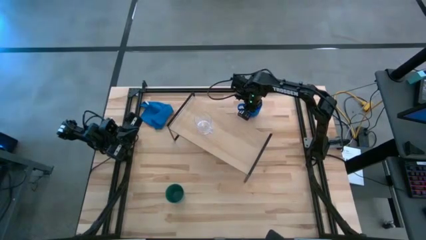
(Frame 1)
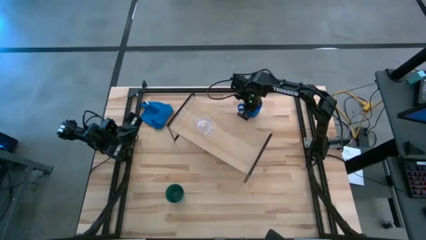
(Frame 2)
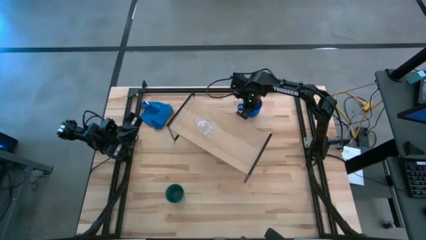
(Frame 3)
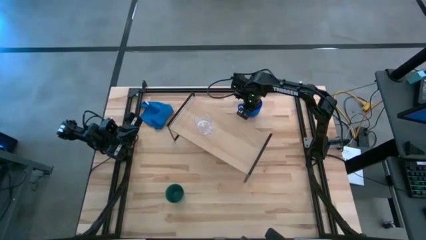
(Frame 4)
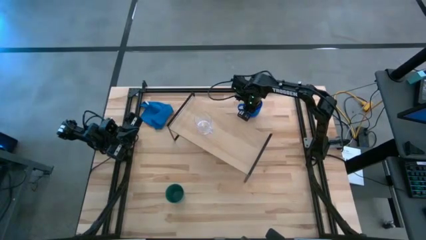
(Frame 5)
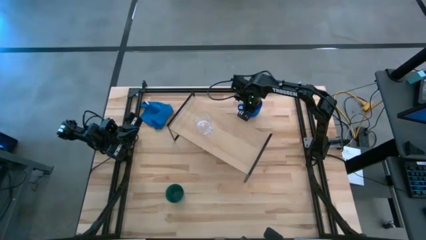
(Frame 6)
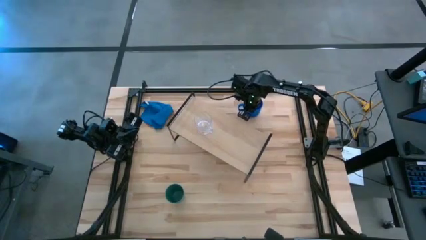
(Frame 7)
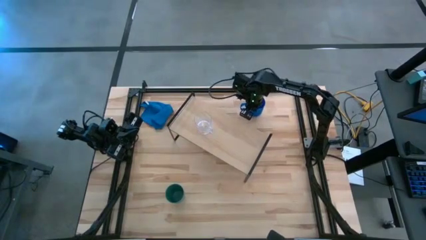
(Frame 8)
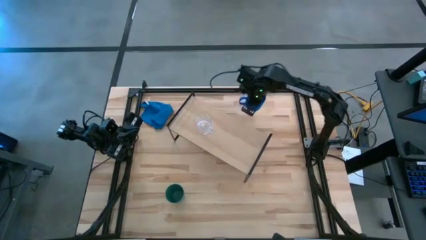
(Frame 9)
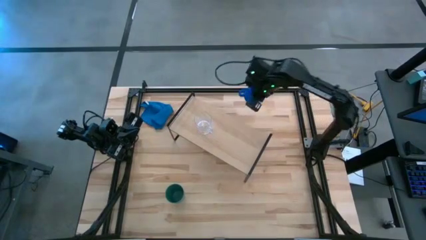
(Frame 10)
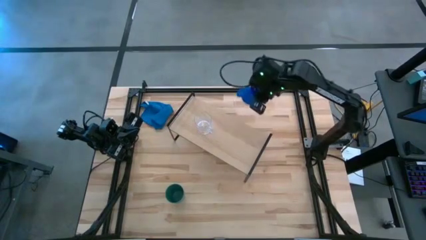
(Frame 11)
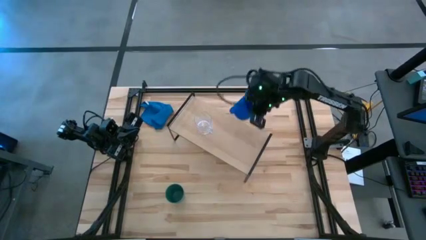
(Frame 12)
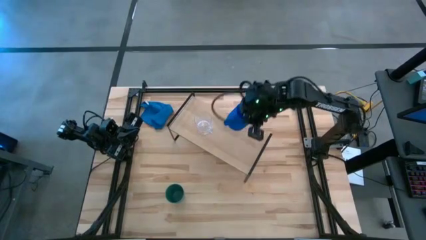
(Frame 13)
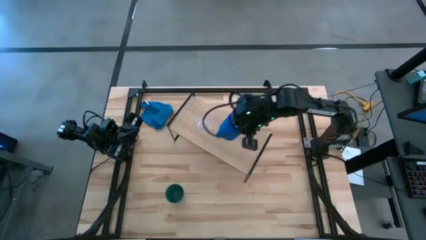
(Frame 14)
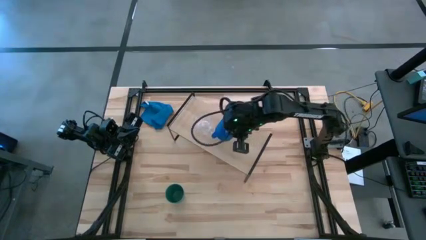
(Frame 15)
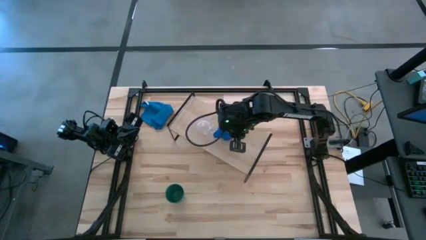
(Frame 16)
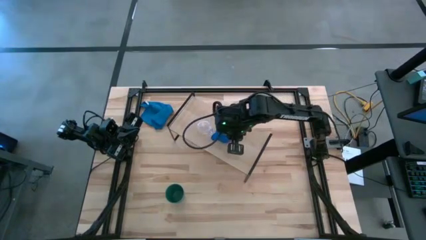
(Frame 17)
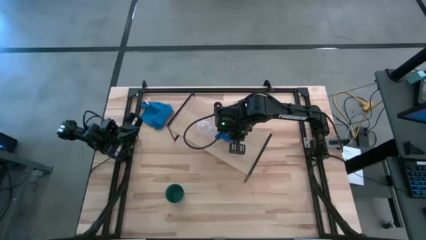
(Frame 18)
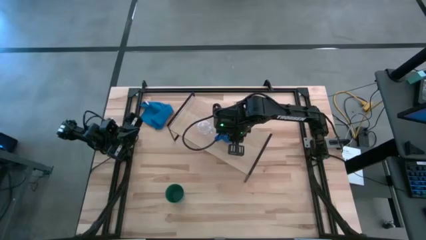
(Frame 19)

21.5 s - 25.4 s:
Task: Stack small to large cups/mugs on shelf
Put the blue mug on the shelf

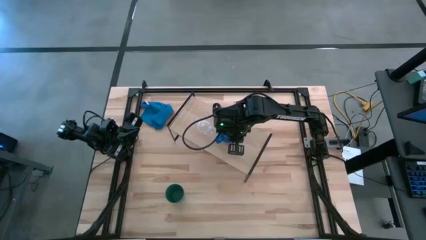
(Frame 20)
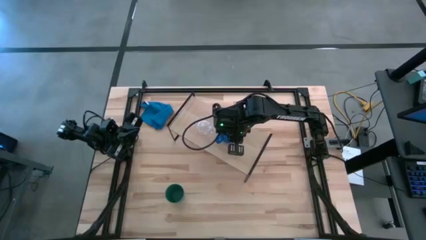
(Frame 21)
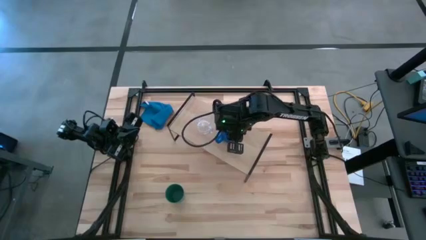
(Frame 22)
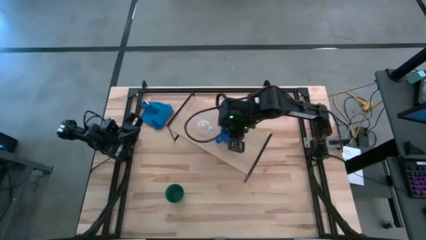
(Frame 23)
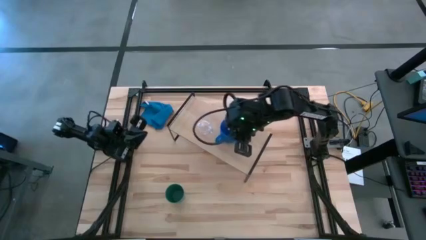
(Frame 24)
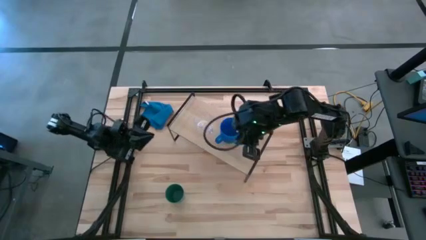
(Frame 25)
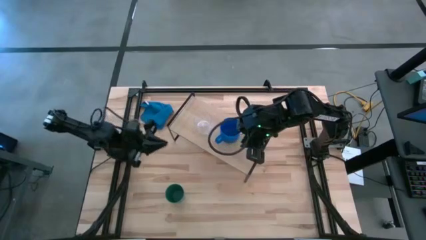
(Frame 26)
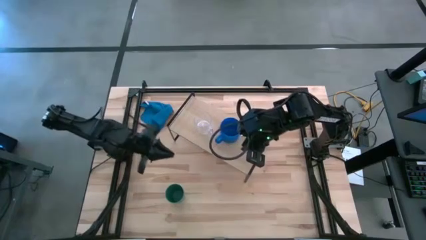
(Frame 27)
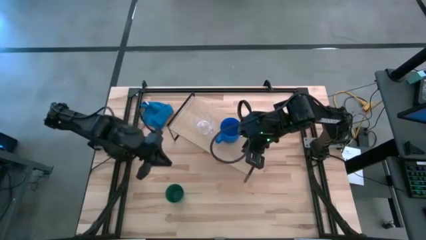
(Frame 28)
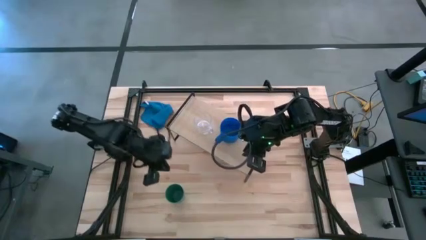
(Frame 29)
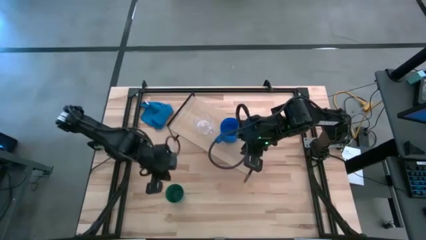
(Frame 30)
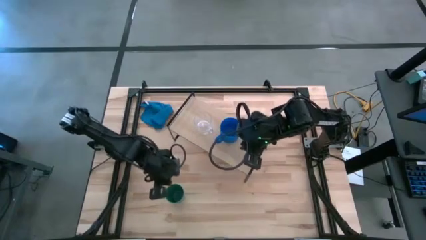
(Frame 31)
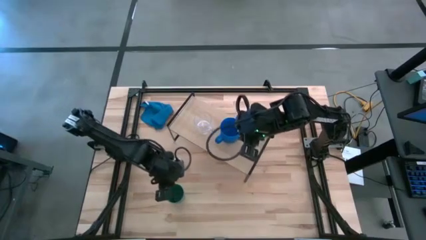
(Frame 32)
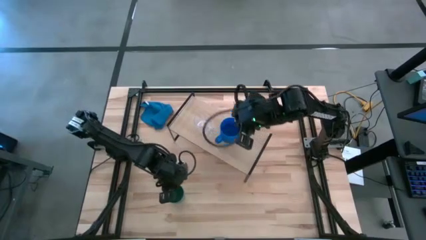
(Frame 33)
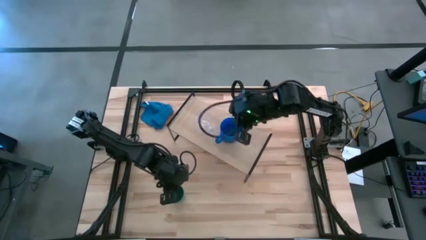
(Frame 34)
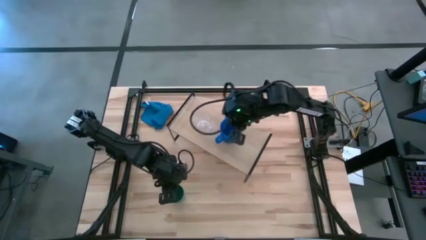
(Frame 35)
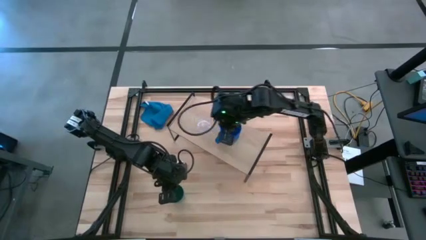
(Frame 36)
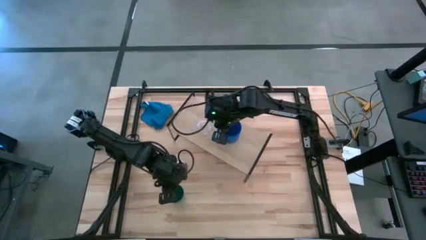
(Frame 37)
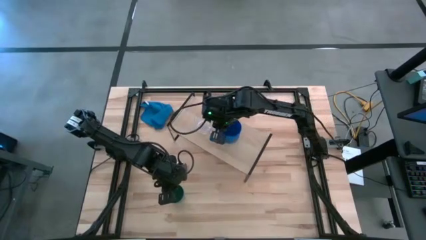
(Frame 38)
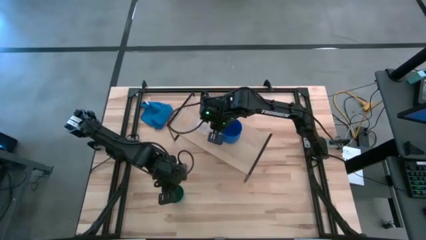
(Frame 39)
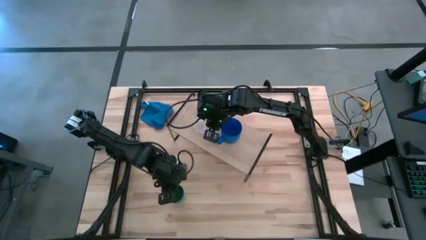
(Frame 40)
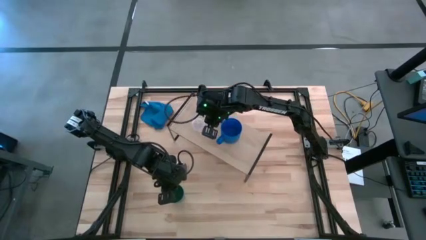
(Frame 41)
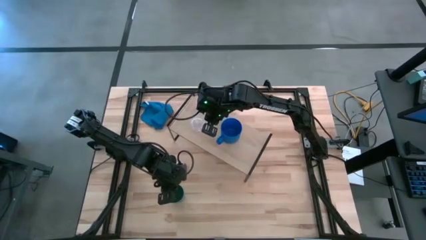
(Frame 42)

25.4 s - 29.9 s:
Adjust the transparent mug on the shelf

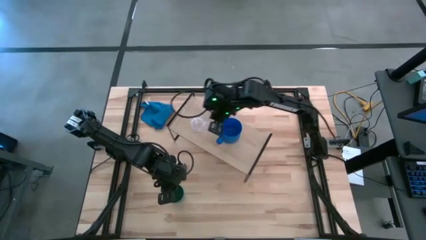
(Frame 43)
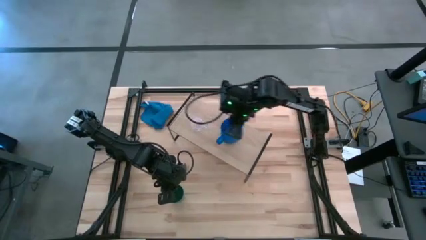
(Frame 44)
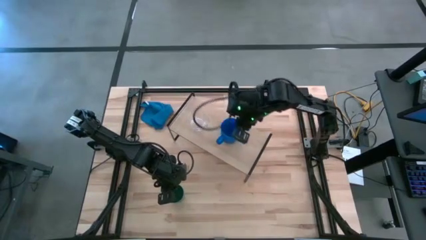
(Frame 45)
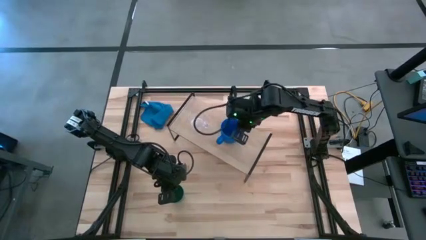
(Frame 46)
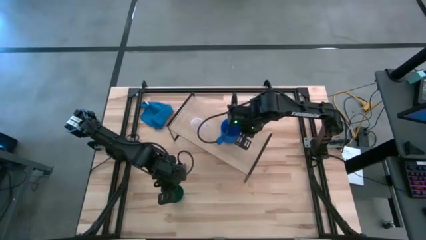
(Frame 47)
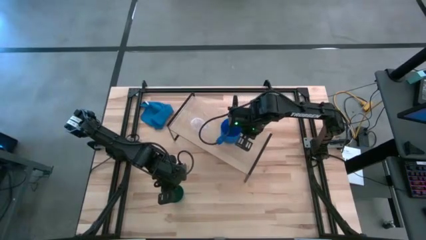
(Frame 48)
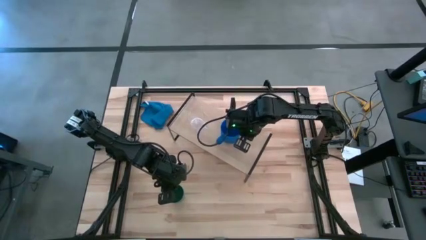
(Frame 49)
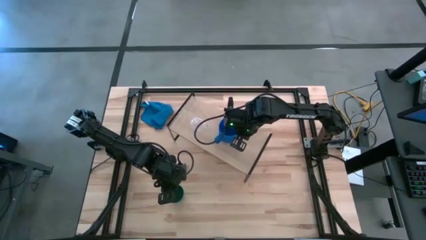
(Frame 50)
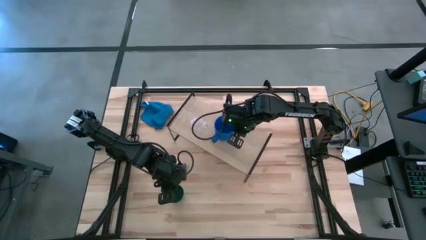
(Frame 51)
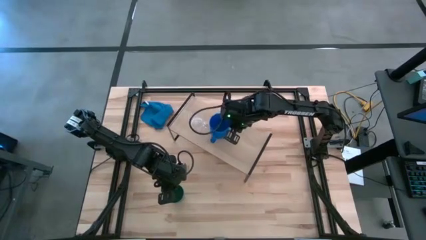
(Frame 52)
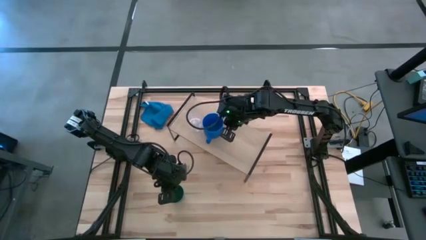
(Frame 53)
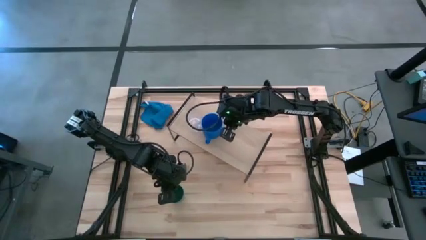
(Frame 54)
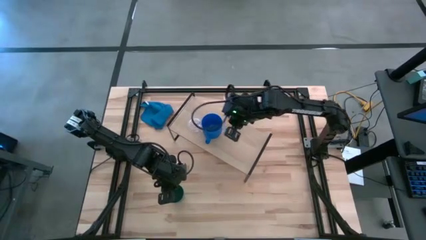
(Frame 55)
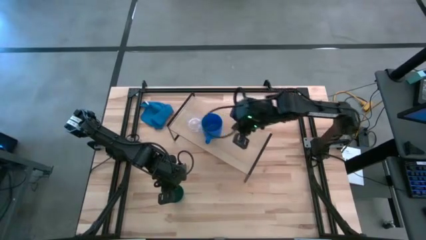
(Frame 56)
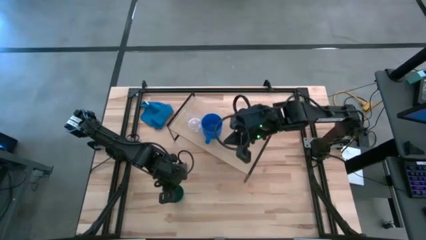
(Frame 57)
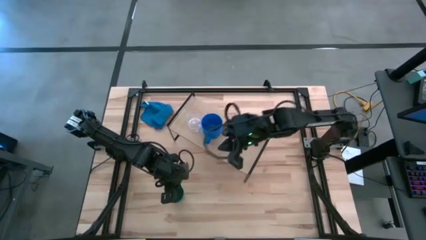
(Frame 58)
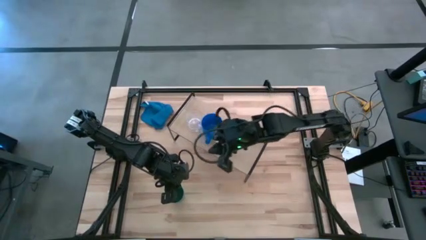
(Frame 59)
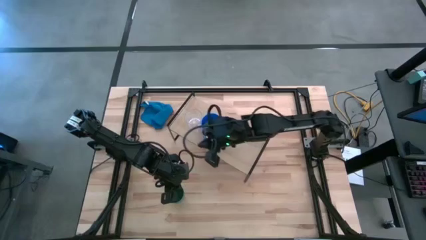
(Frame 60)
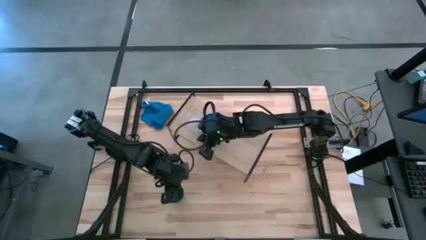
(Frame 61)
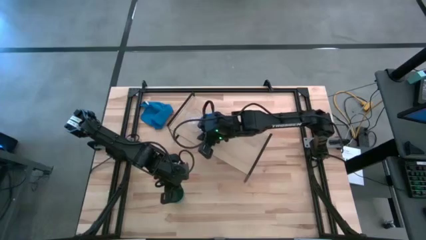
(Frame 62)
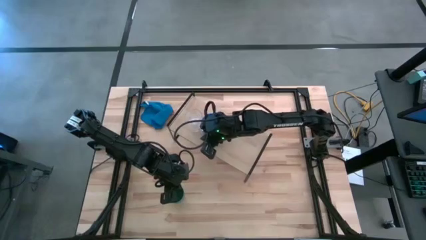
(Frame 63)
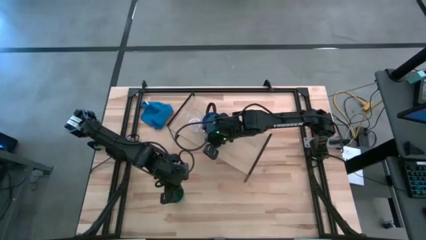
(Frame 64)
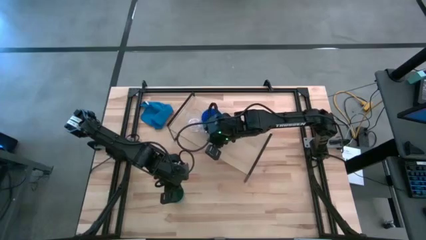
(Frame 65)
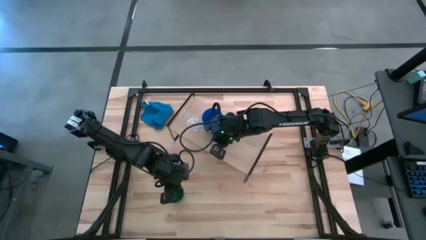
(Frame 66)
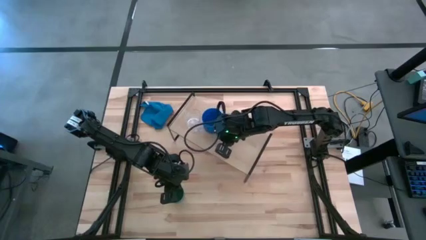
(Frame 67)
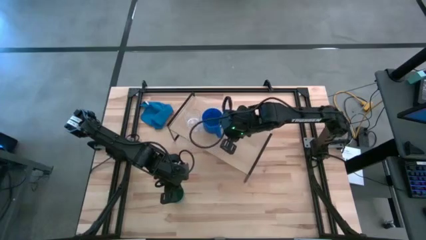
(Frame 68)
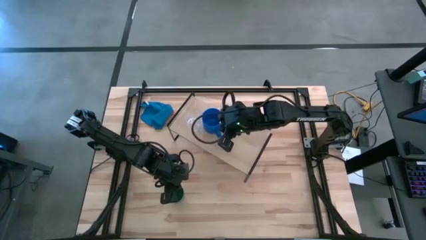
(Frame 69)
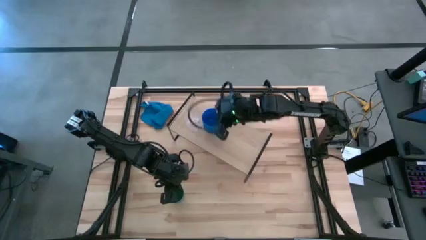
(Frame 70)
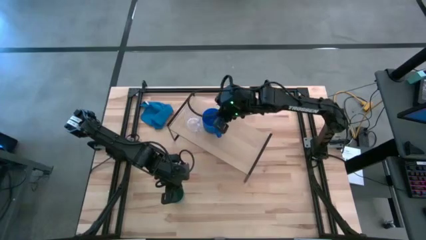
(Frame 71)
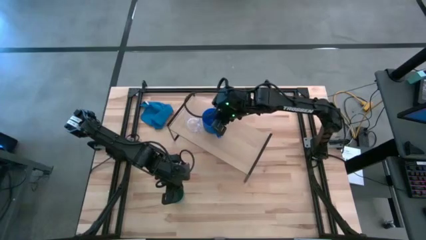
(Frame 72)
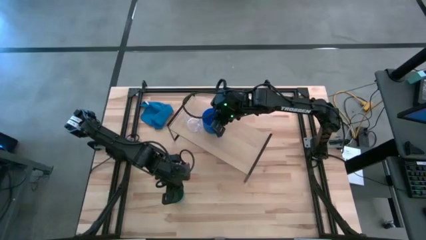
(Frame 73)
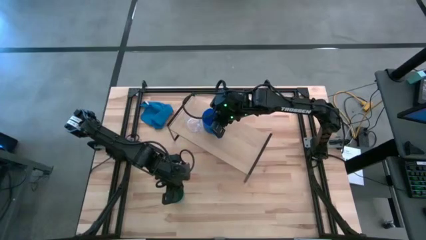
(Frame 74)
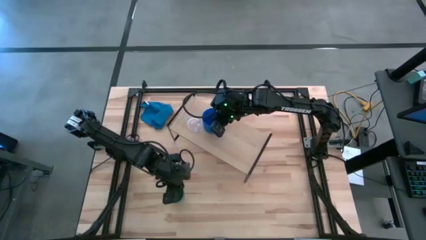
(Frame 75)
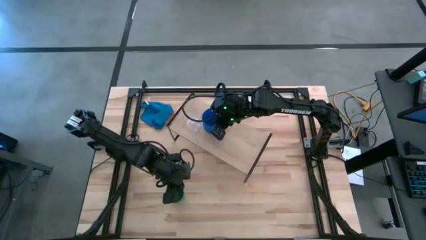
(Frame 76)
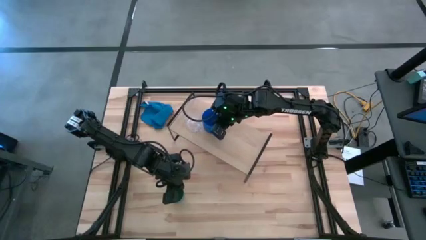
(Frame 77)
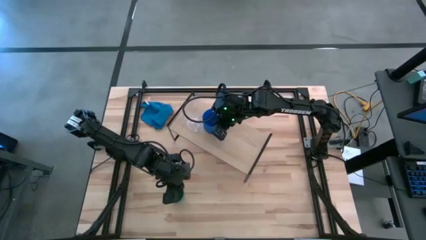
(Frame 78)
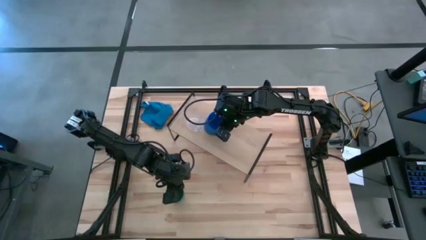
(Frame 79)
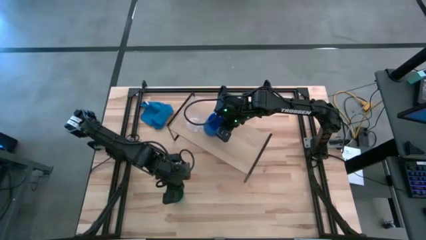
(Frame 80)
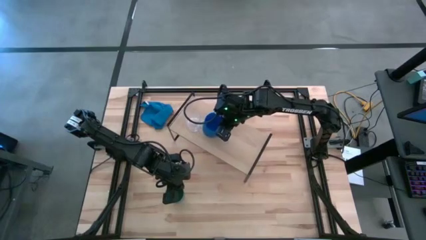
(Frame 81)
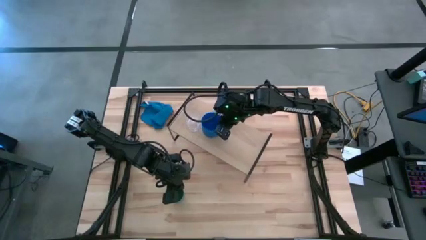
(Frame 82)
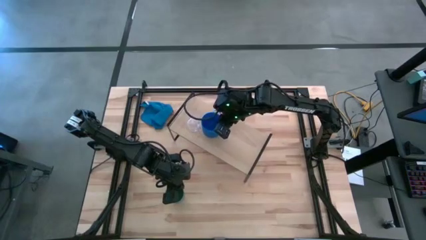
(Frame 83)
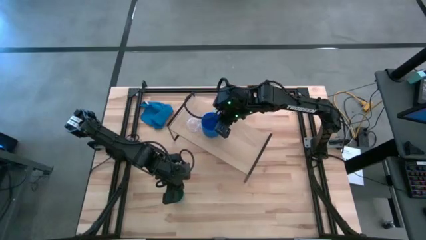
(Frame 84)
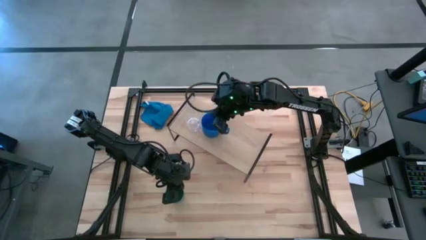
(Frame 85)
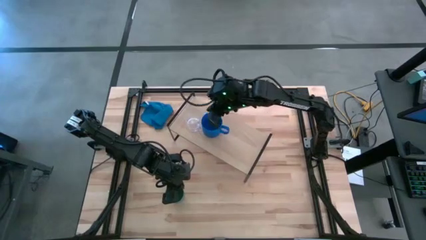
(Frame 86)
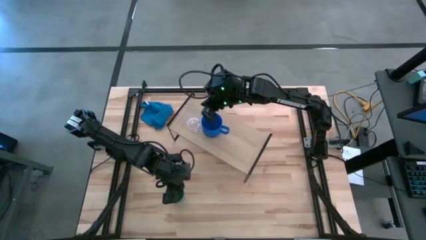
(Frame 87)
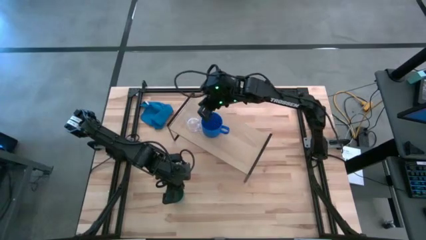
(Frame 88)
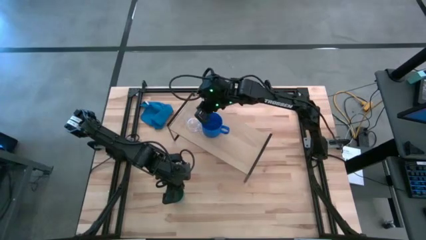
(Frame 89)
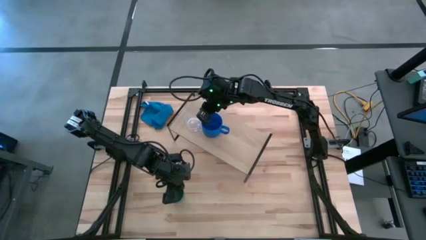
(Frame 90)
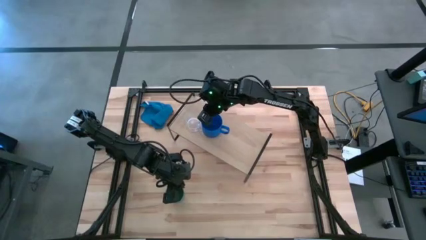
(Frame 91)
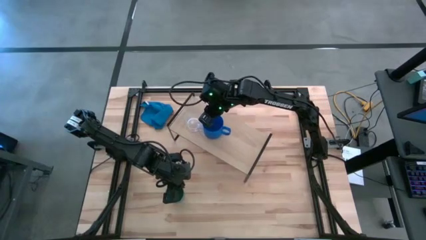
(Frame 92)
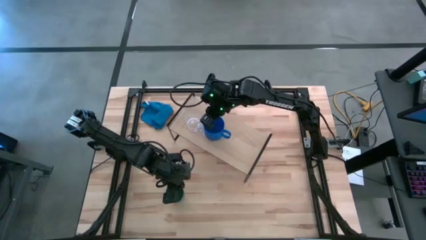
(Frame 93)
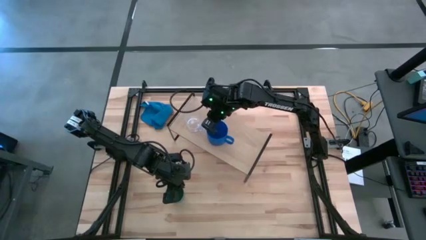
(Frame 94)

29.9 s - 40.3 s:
Adjust the blue mug on the shelf
